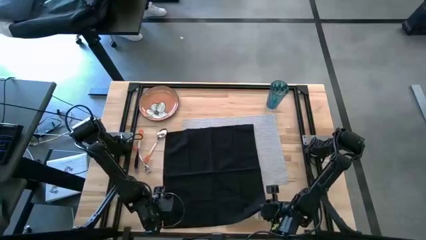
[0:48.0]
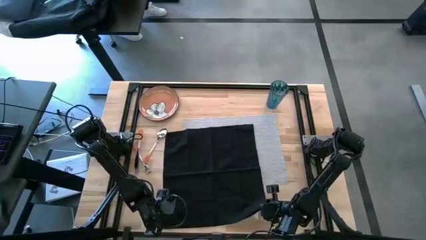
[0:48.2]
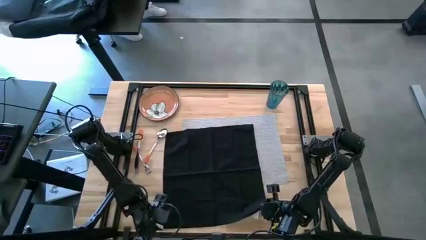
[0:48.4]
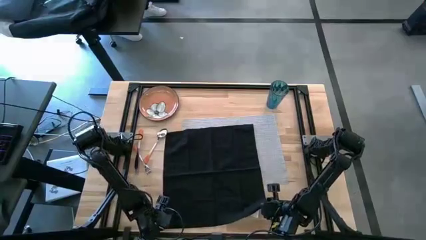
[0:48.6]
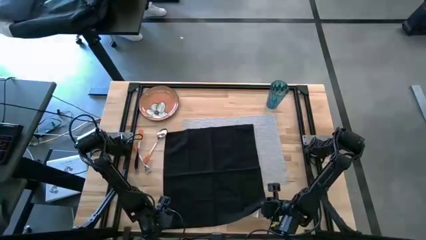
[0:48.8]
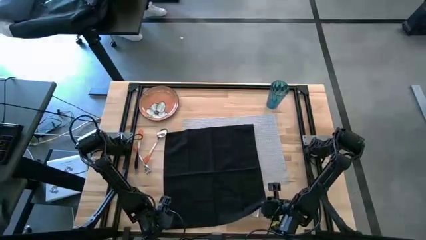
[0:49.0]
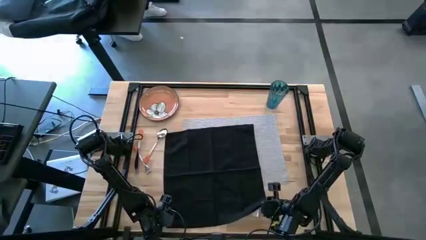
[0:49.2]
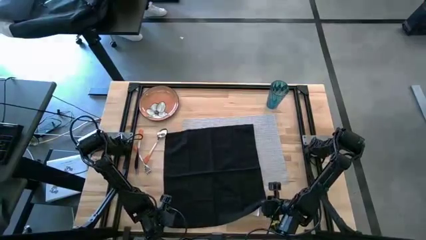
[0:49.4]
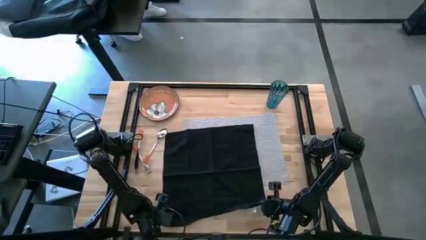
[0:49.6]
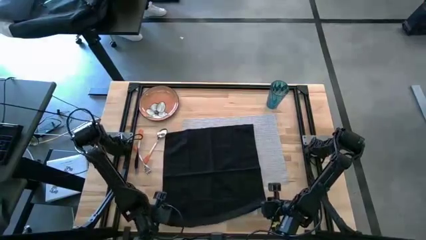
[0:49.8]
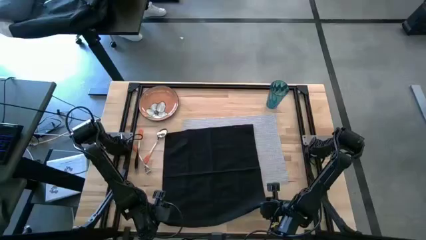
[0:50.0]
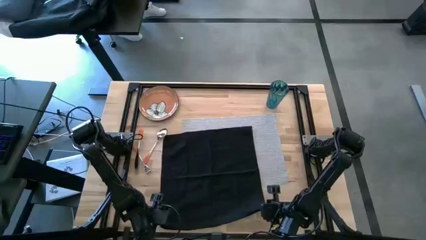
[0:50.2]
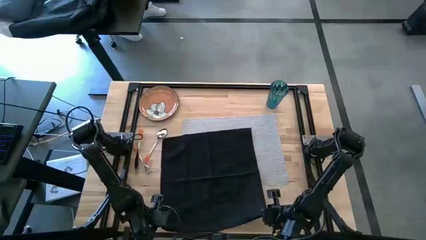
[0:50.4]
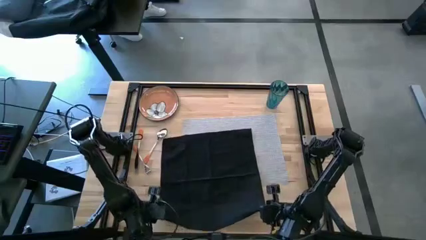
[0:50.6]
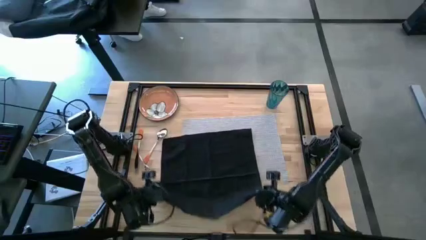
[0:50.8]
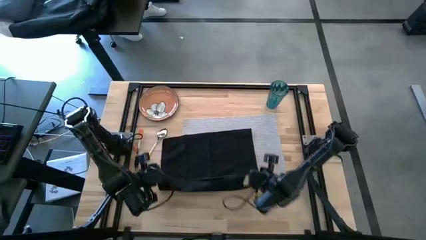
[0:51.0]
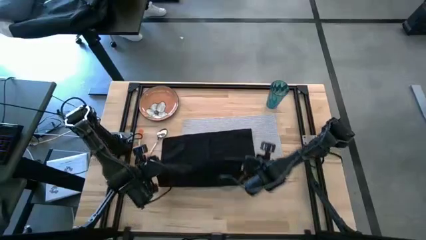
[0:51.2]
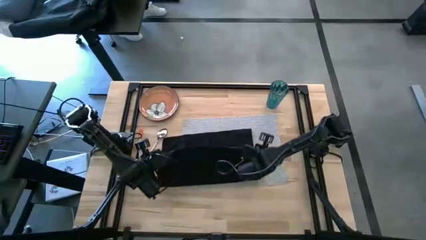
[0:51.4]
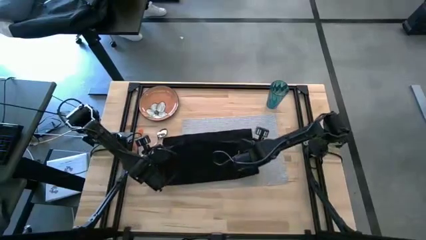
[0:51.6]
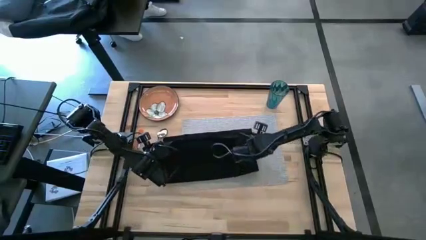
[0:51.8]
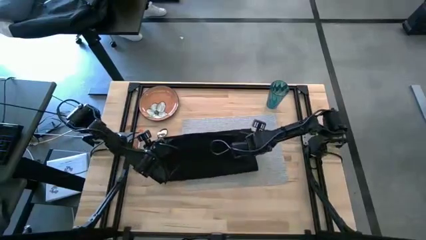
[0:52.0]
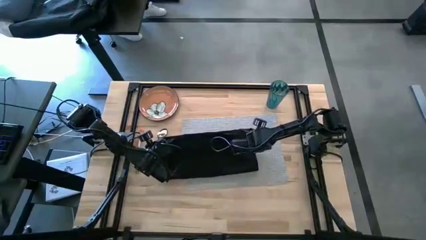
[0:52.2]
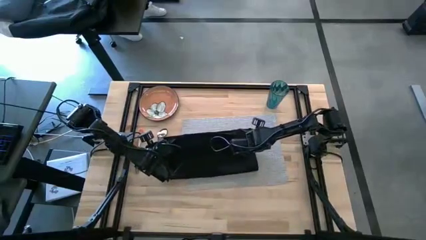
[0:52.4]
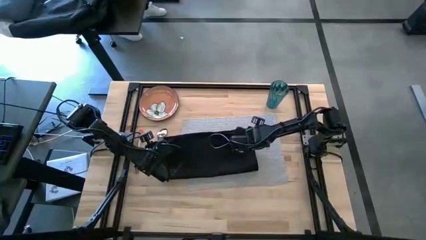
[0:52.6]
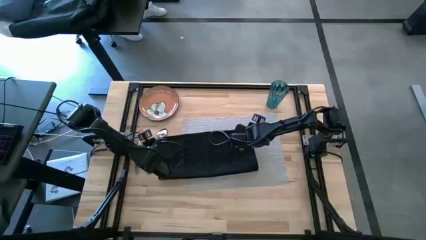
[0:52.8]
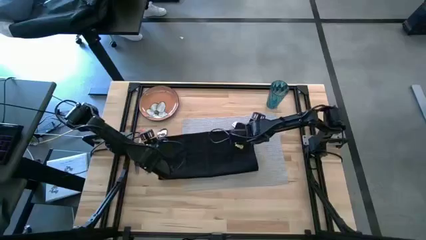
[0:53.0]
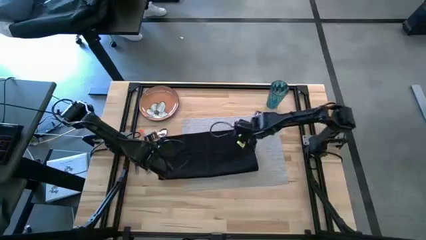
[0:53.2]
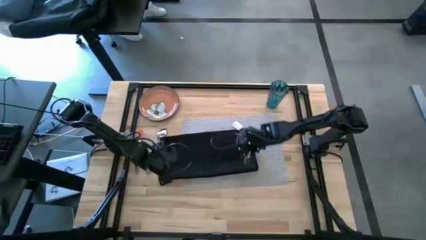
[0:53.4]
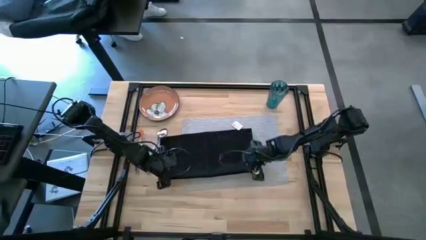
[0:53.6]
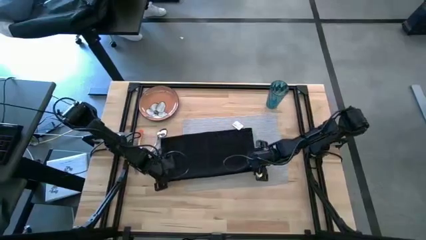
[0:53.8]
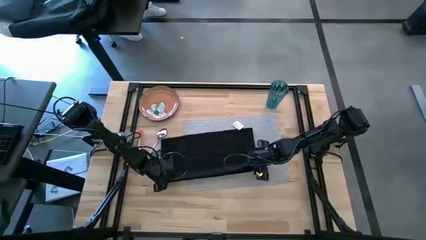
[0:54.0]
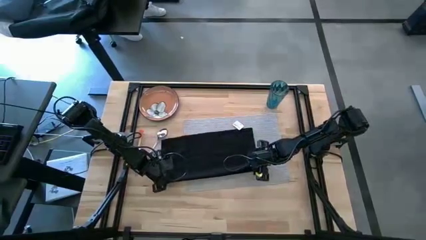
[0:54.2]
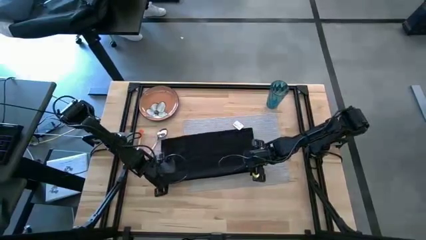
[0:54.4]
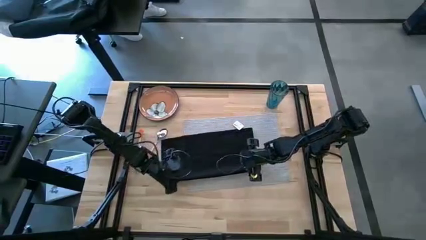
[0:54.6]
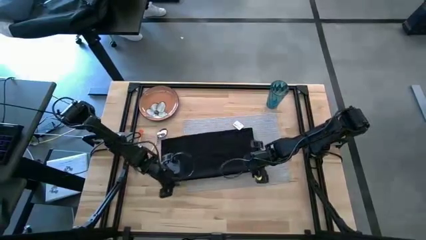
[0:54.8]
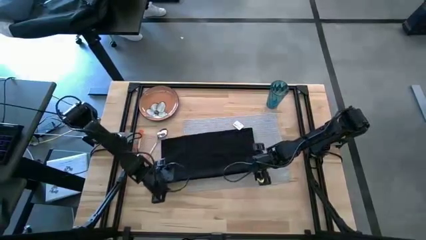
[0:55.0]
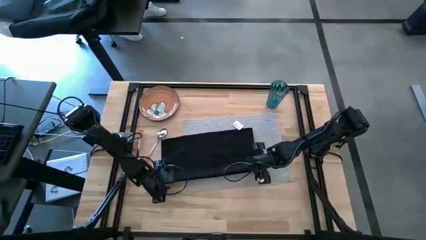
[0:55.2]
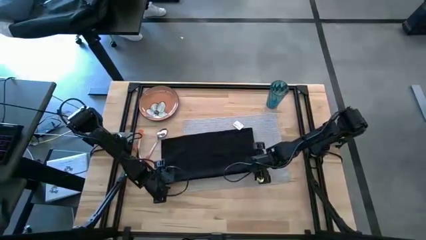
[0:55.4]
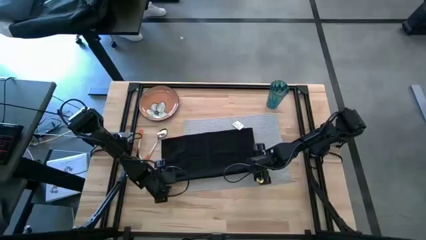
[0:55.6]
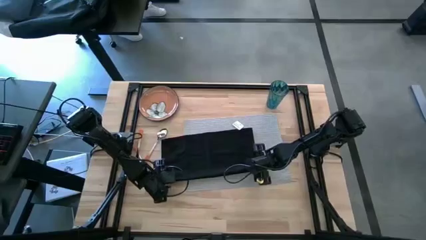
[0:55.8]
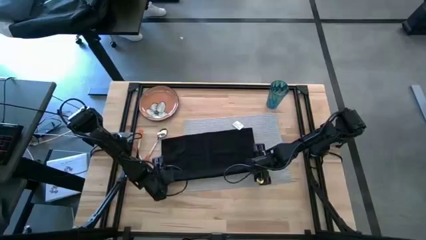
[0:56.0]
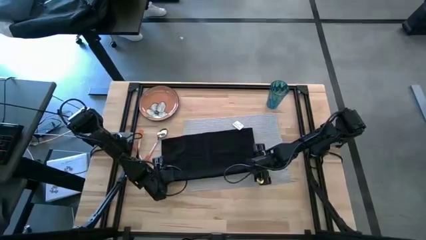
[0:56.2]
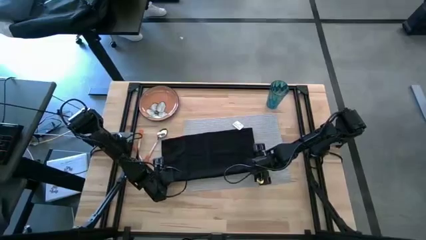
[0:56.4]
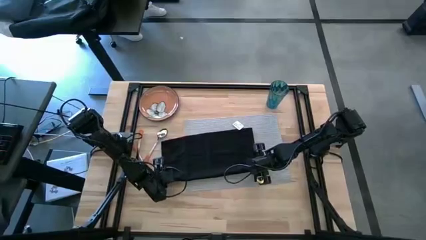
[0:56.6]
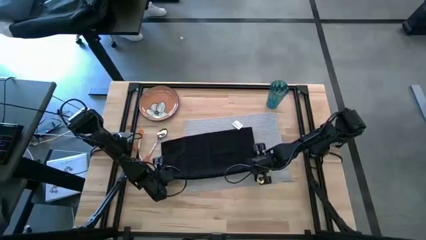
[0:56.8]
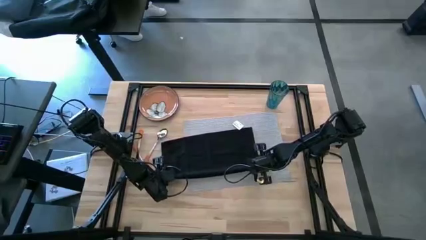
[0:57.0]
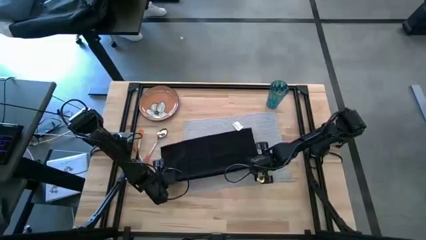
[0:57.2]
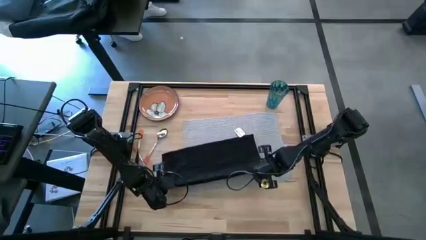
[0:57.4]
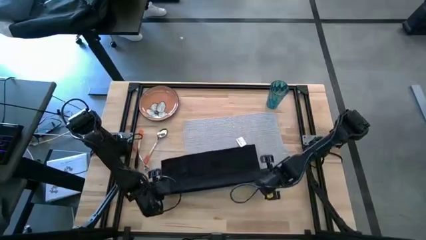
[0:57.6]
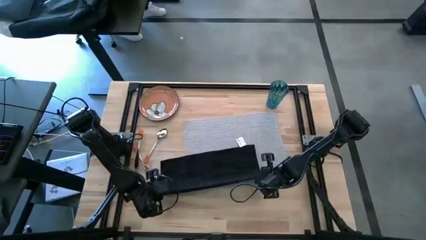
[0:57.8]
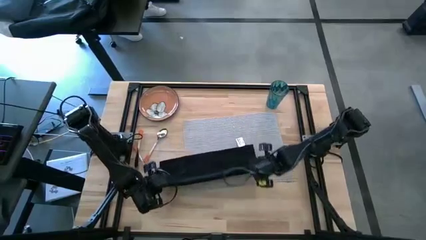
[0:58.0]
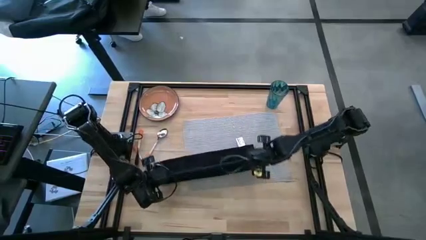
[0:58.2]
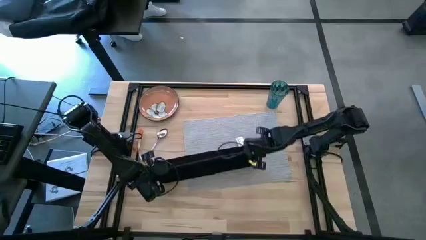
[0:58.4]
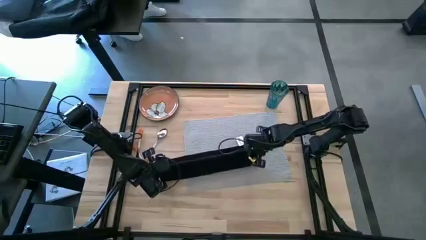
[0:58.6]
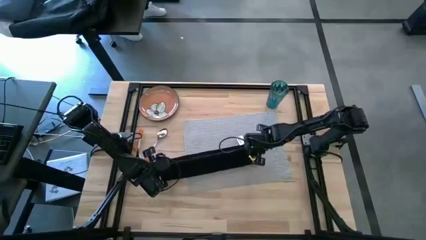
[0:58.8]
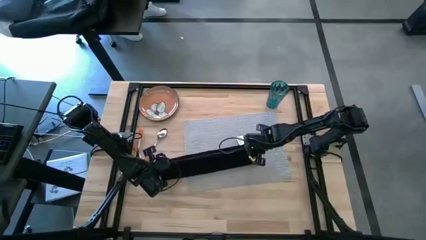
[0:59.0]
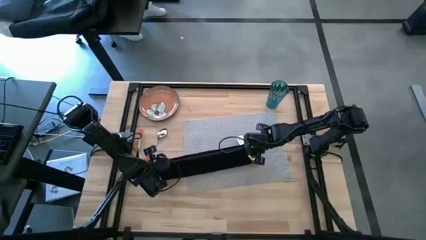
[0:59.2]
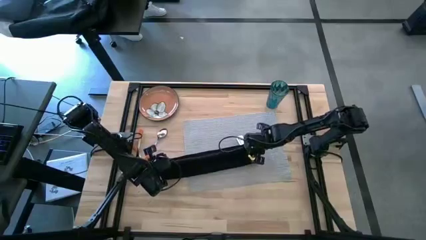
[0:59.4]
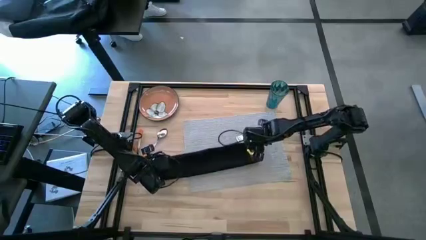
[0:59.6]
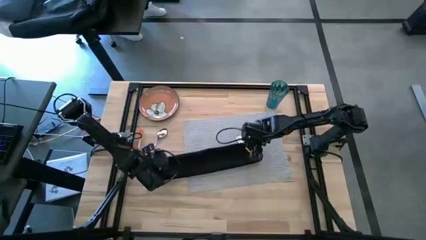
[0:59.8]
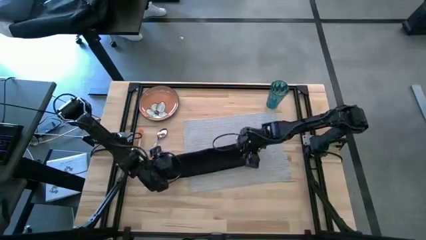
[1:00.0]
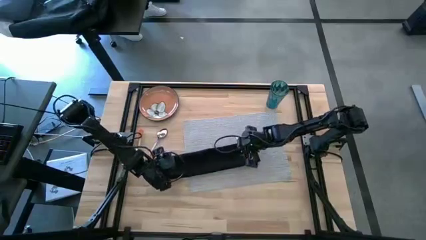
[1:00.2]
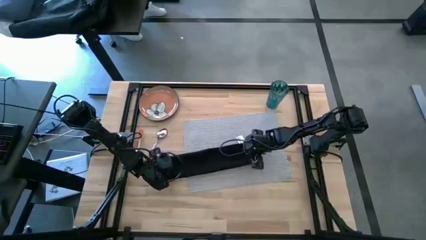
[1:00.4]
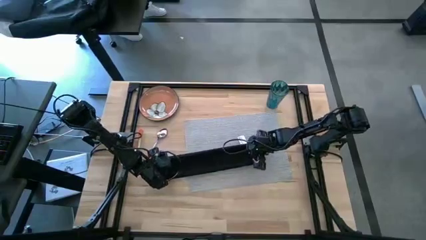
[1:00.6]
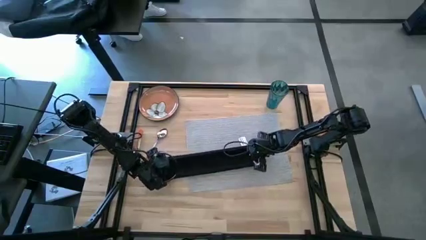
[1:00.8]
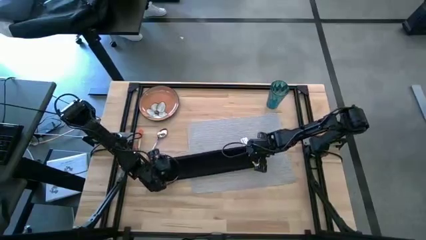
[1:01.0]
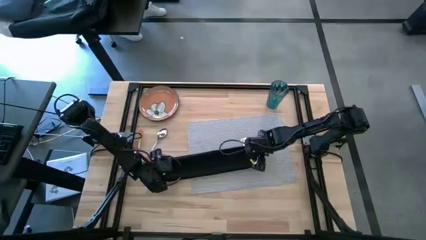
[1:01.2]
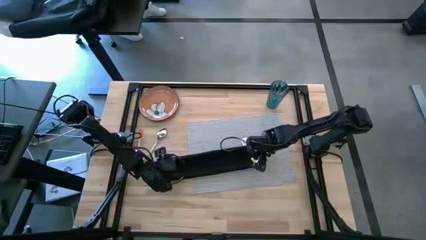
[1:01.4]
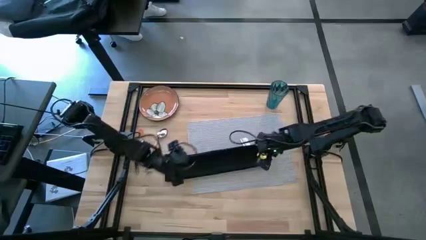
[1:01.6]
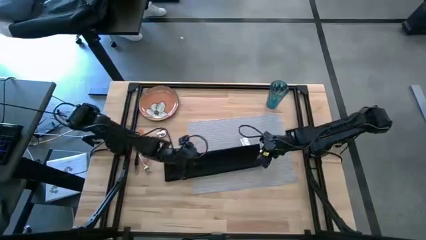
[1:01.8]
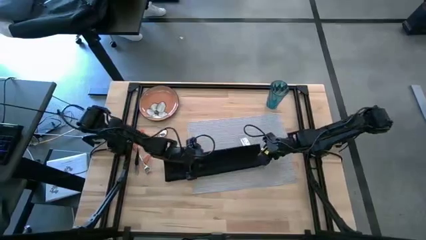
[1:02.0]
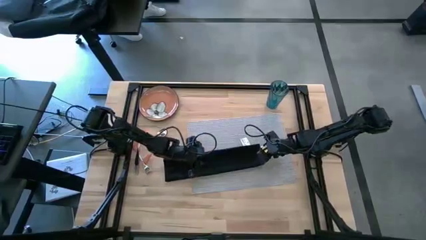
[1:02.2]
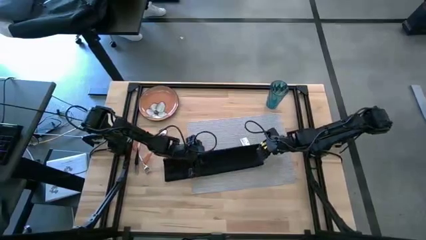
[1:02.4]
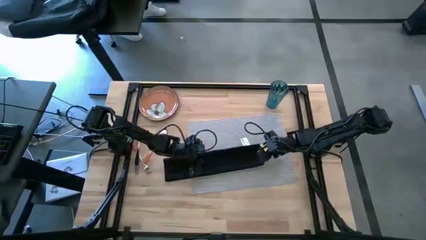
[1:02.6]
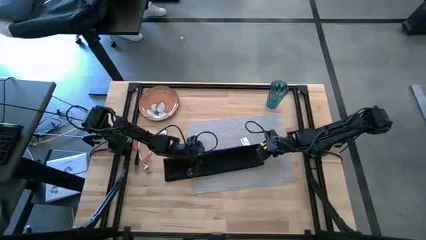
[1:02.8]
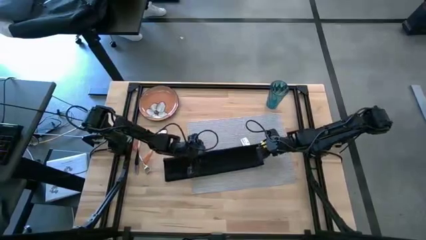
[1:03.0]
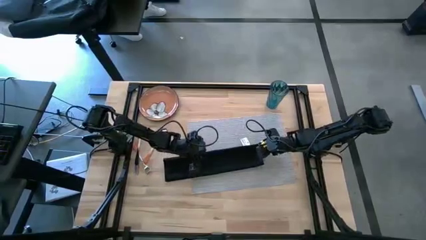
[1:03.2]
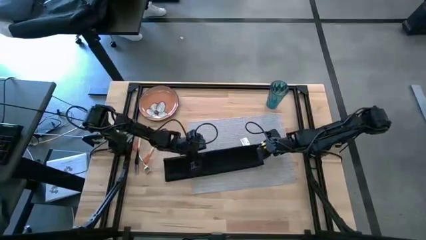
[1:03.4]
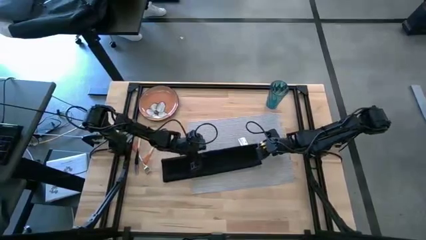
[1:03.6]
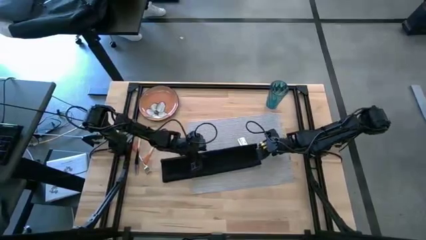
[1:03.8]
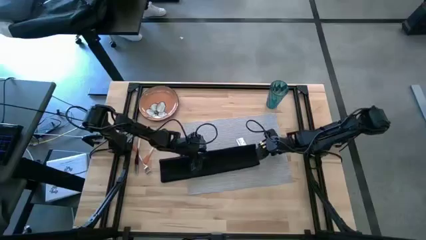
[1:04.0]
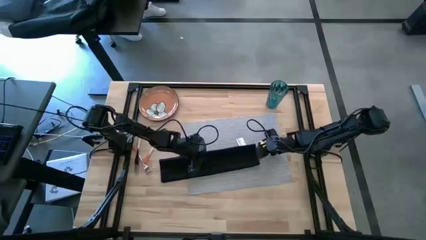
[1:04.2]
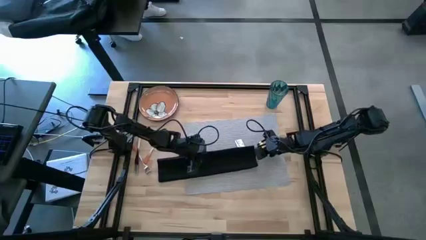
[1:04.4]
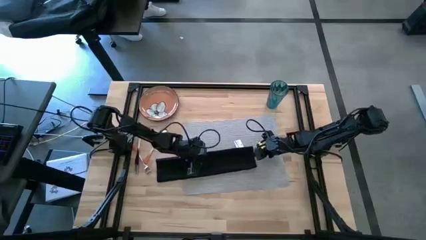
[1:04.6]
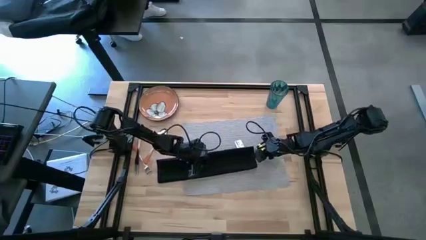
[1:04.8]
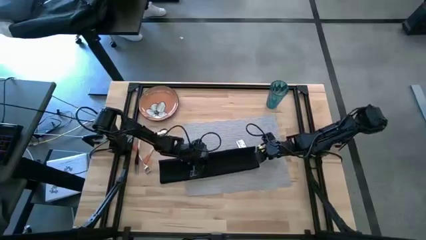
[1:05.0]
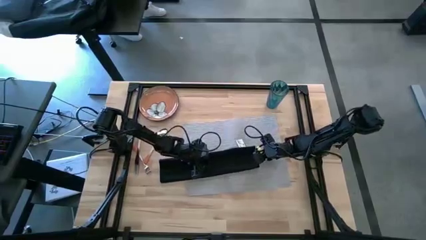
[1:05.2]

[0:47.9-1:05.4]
Task: Set table place
Fold the black table napkin
